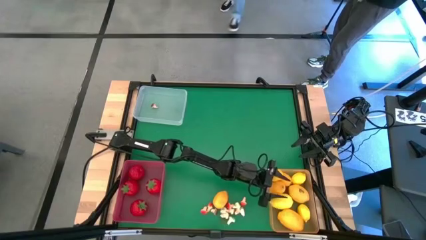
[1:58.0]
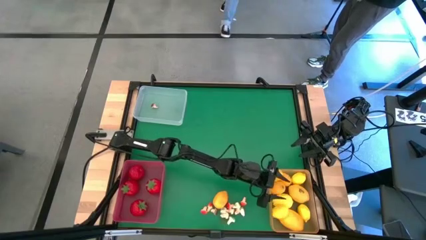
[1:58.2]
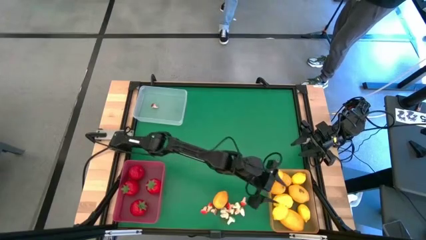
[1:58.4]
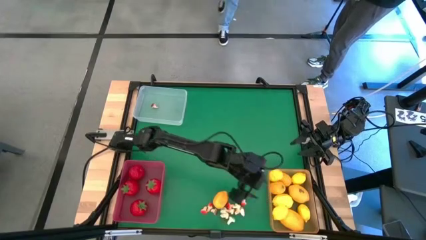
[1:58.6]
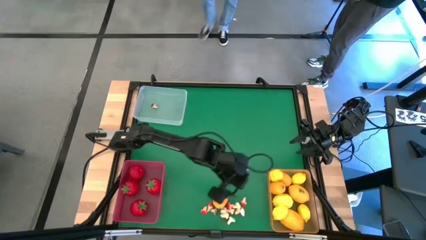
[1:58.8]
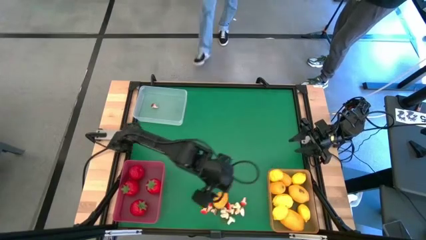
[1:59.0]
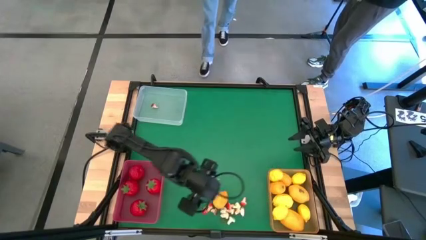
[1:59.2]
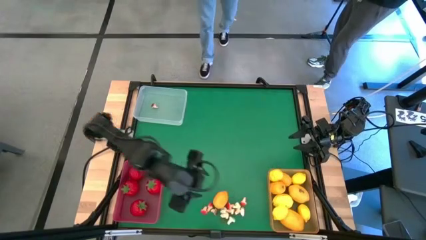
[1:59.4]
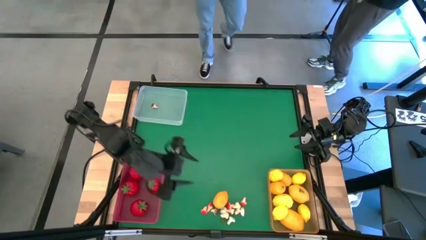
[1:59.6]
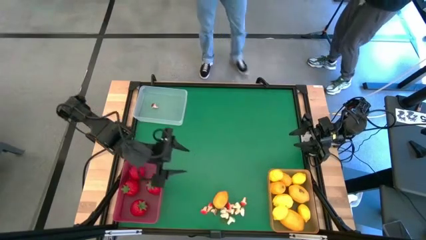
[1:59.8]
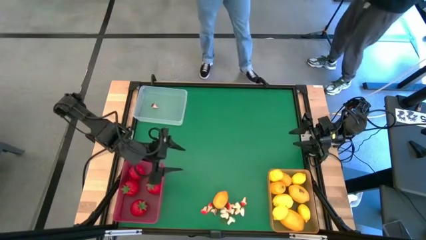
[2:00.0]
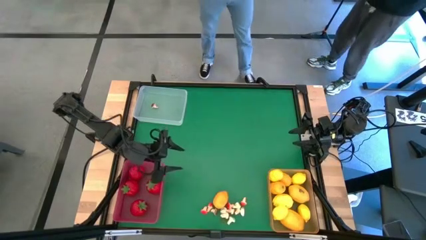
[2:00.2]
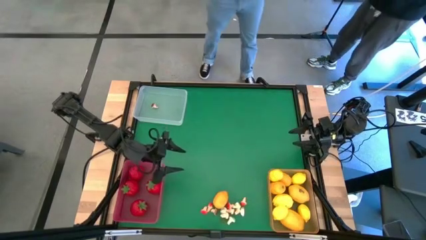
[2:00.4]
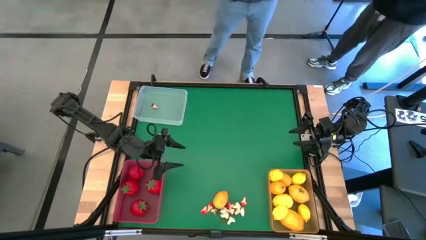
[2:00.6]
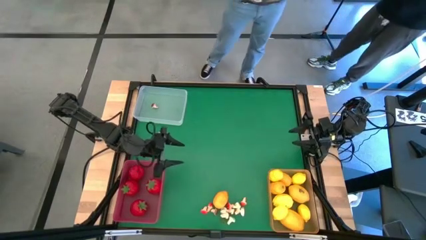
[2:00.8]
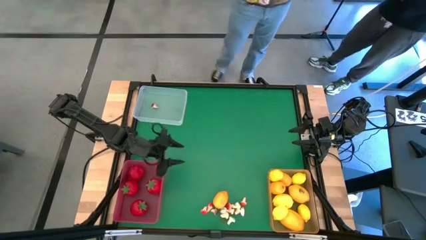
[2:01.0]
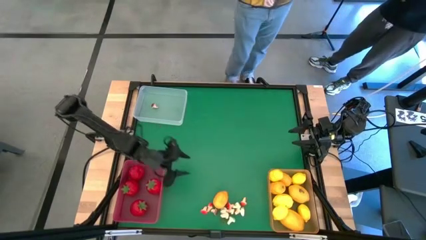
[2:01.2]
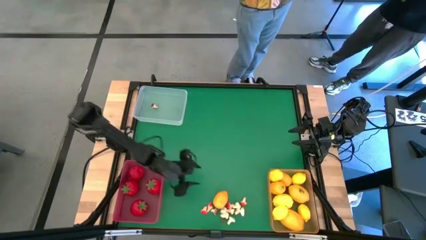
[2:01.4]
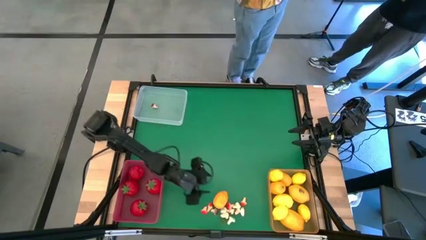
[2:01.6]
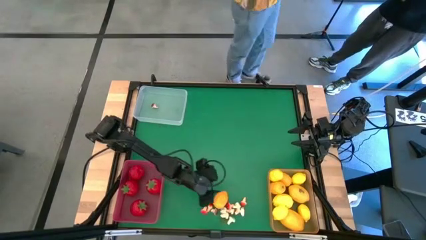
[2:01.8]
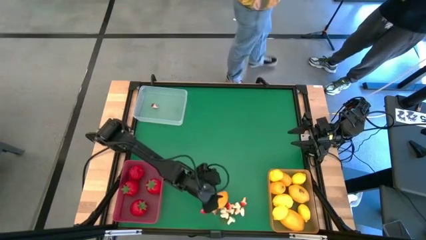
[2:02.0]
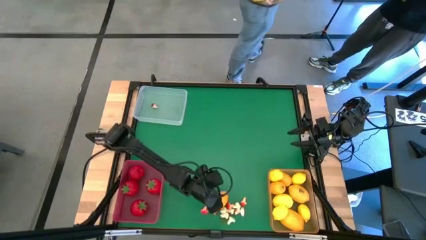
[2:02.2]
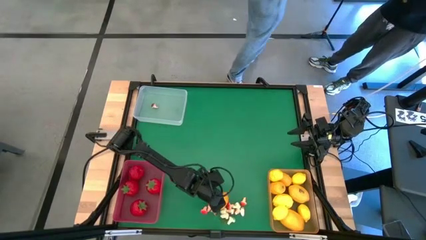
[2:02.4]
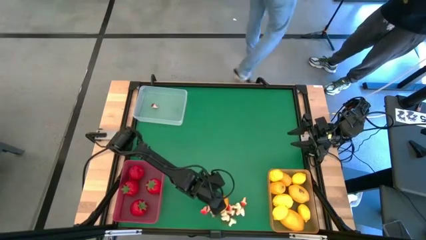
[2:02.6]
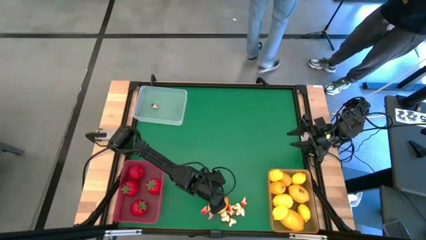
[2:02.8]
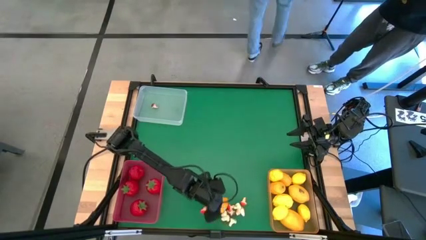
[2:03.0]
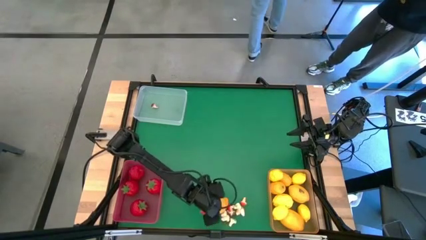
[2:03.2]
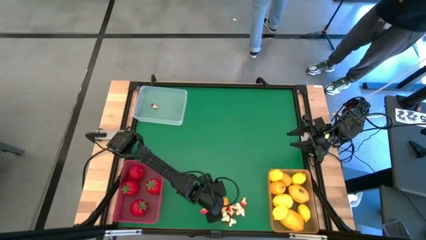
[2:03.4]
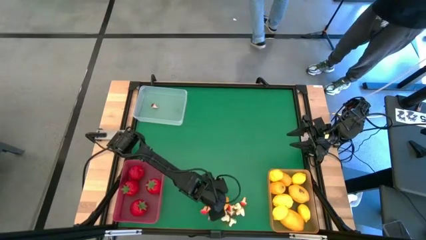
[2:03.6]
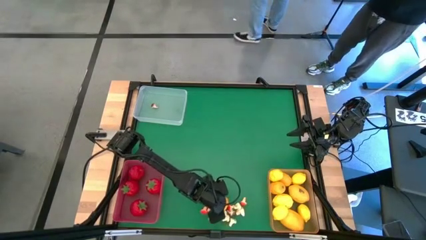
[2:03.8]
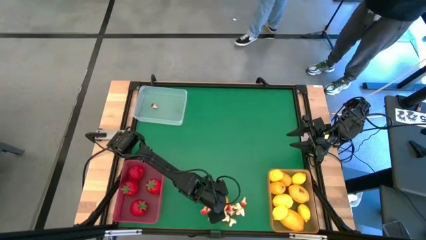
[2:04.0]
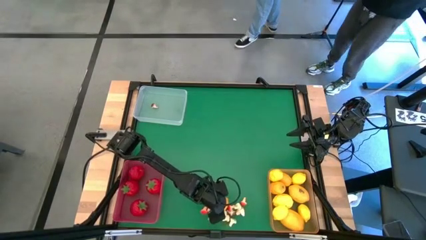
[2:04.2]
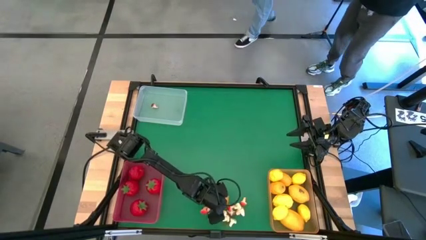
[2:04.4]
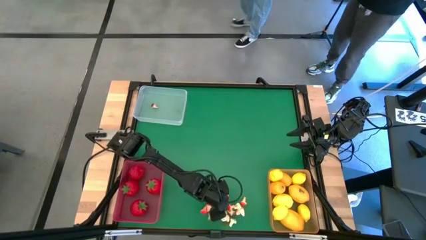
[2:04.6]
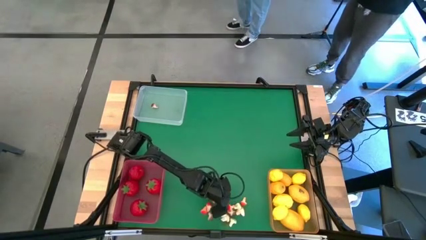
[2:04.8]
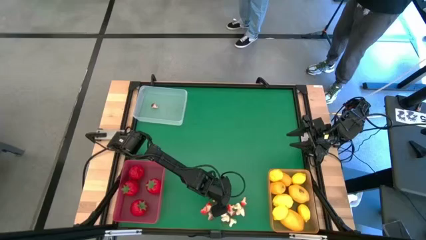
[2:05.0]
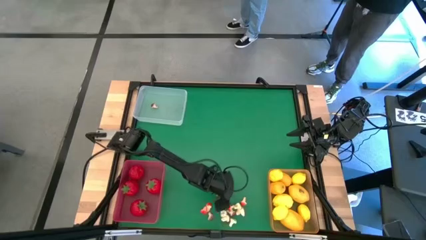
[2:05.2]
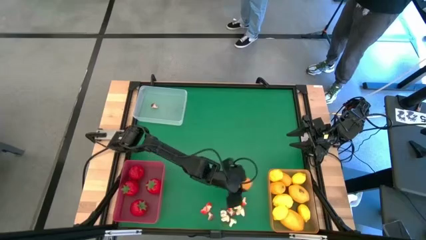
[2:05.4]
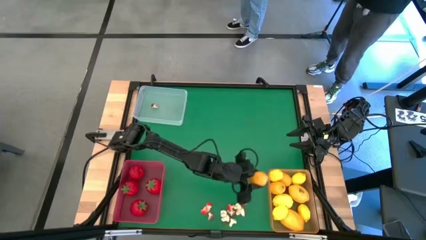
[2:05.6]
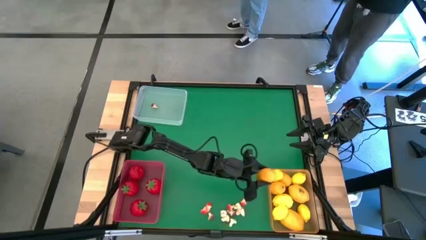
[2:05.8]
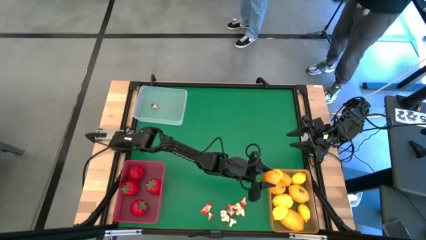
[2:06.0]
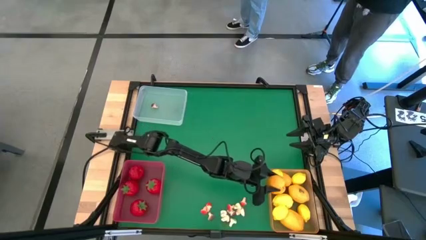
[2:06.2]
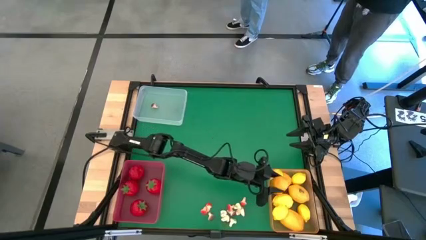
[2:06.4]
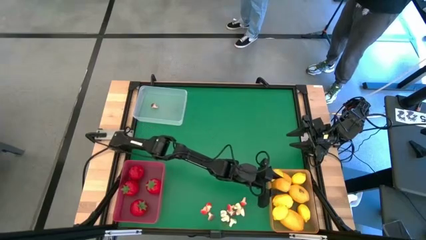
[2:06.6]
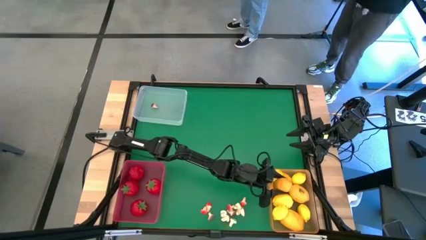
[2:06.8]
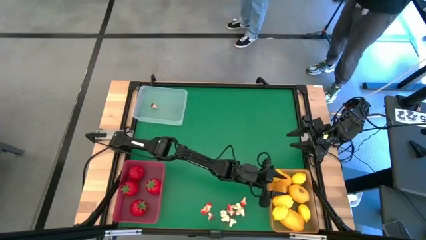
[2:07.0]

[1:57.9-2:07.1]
Task: Sort produce into baskets
Put the yellow lemon into the orange bin

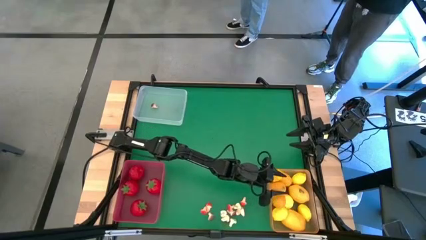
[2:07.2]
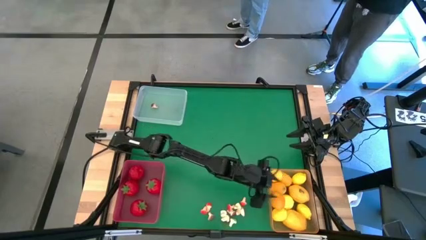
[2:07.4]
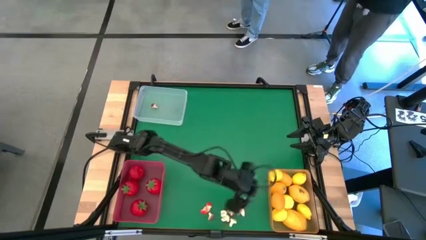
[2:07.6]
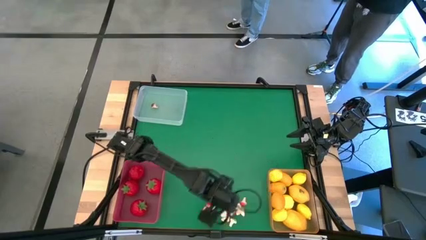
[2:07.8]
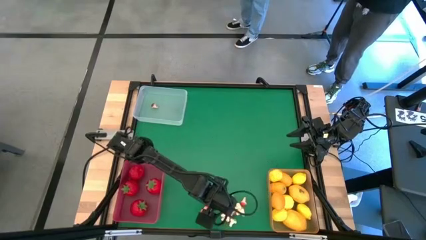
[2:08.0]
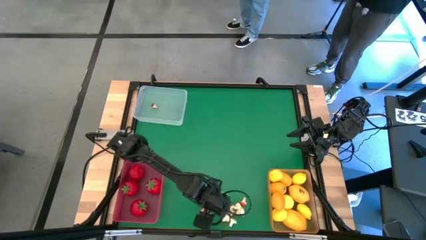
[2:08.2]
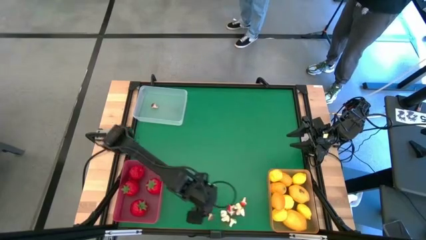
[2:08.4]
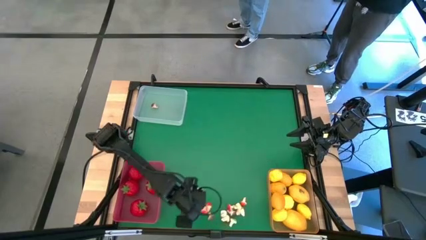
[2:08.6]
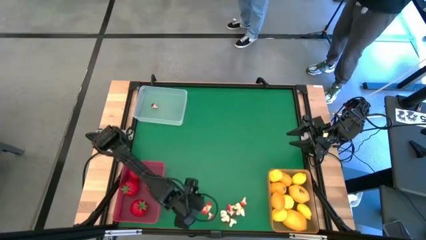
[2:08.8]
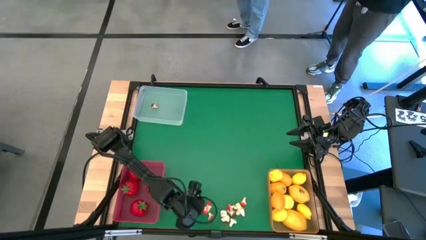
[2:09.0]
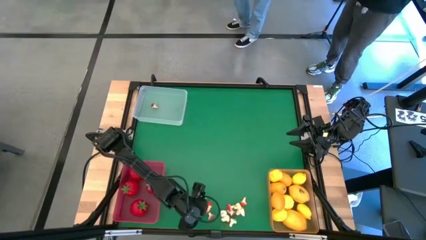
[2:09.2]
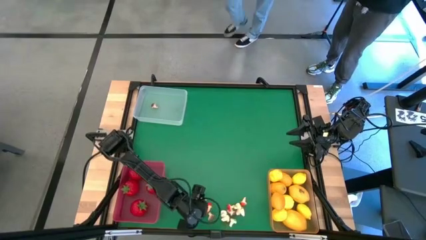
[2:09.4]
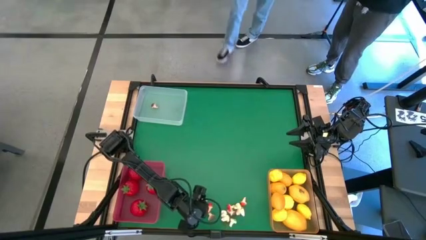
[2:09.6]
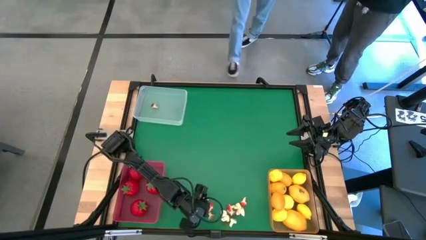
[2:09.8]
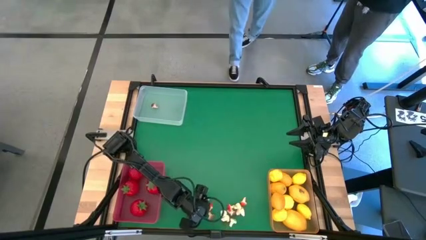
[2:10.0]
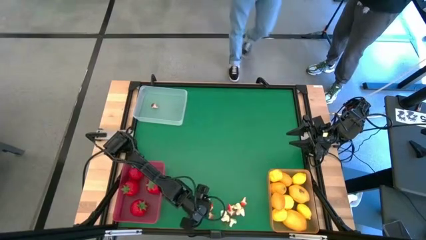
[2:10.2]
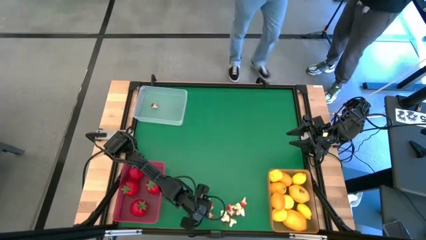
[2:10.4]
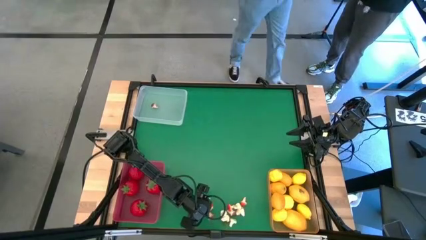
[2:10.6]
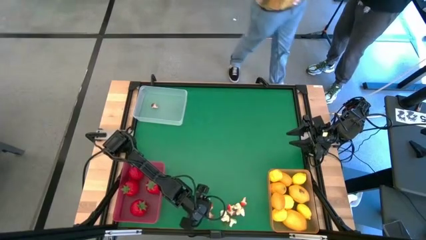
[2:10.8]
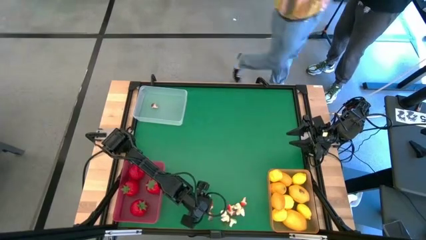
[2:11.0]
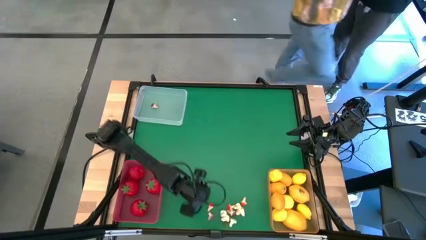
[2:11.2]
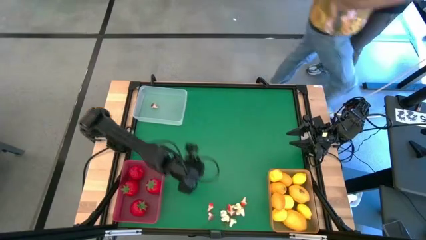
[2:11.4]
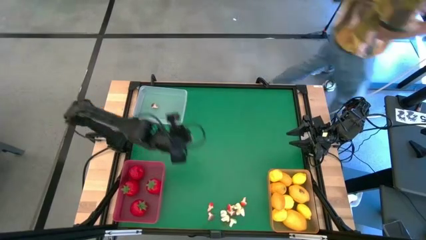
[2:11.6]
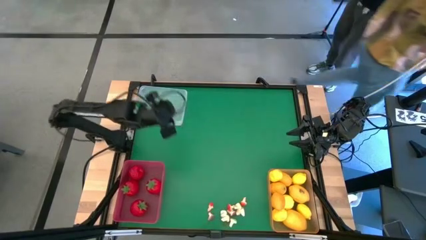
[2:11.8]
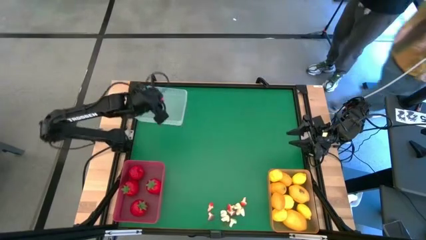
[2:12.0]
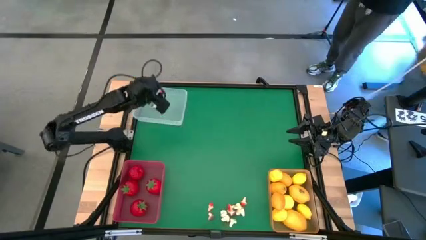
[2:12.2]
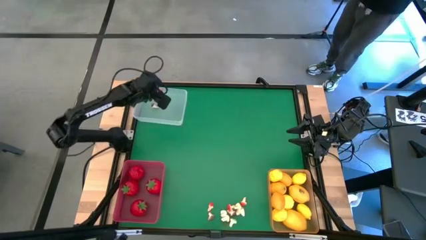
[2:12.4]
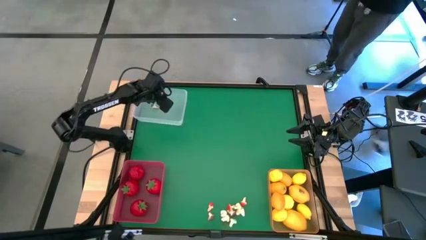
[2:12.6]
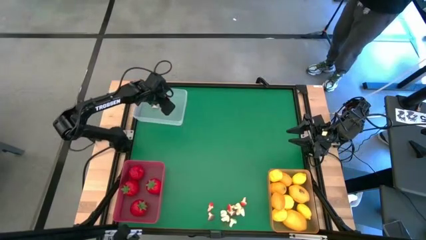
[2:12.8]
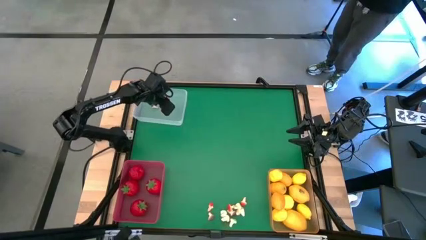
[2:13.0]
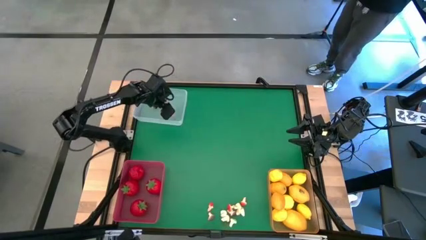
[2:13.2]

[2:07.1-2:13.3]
Put the red mushroom into the white bin
